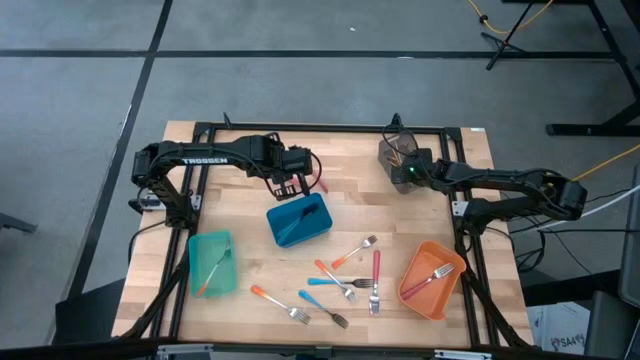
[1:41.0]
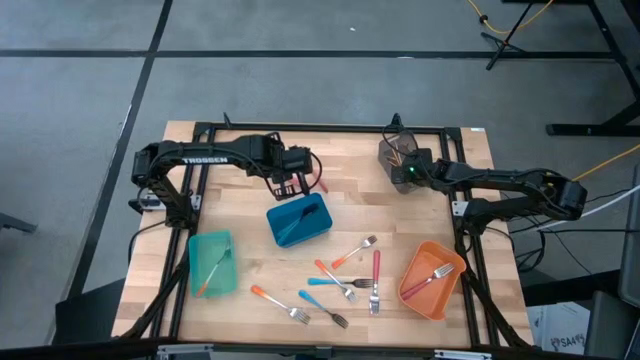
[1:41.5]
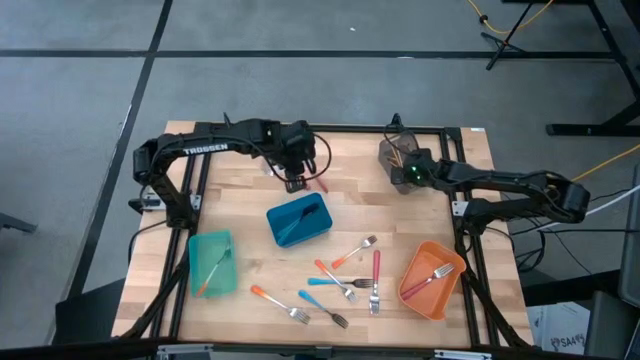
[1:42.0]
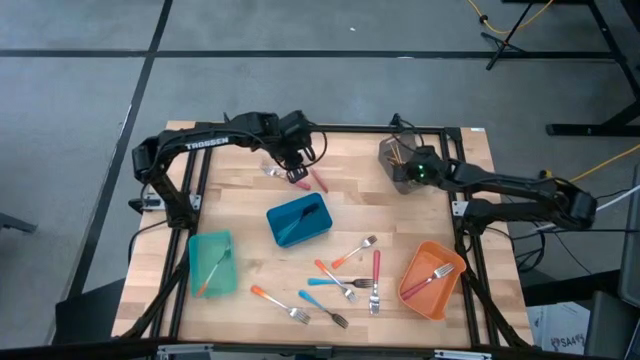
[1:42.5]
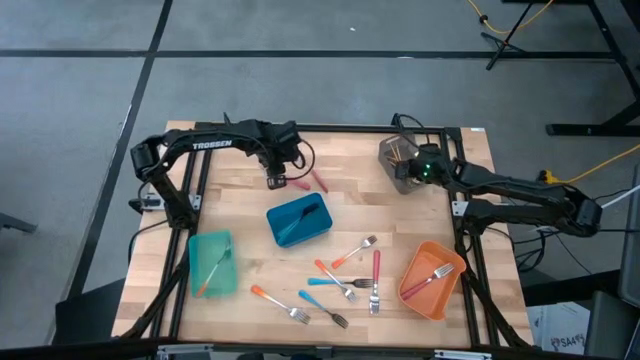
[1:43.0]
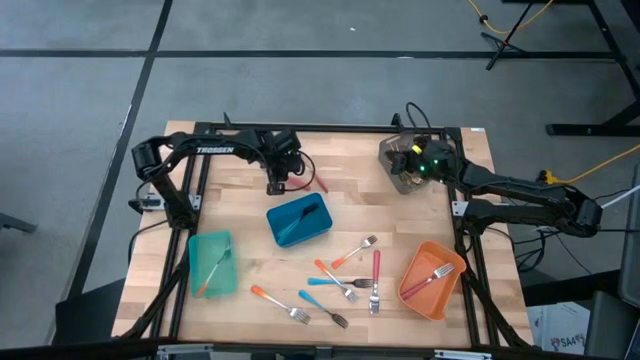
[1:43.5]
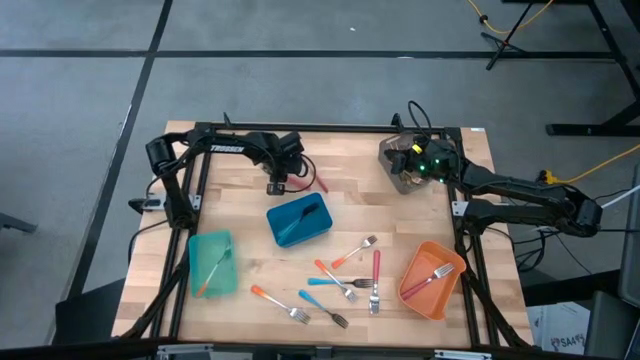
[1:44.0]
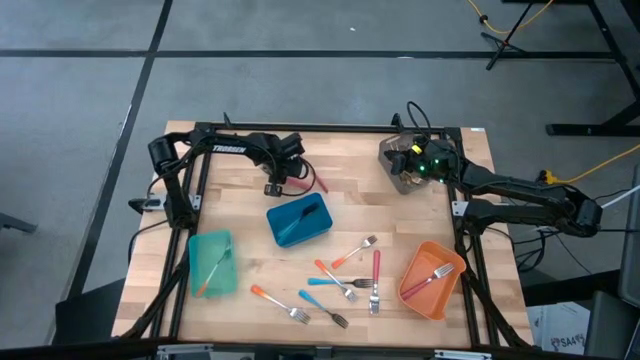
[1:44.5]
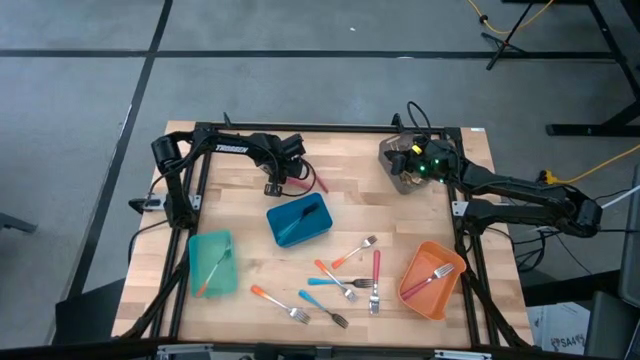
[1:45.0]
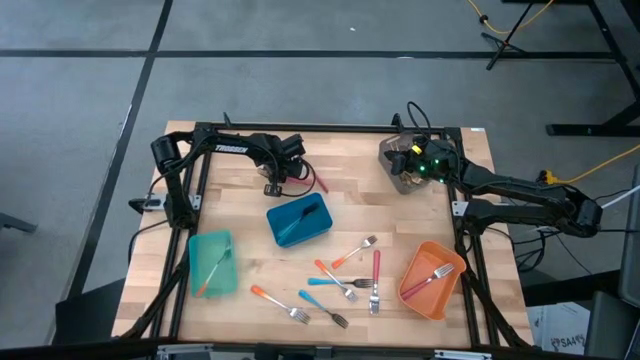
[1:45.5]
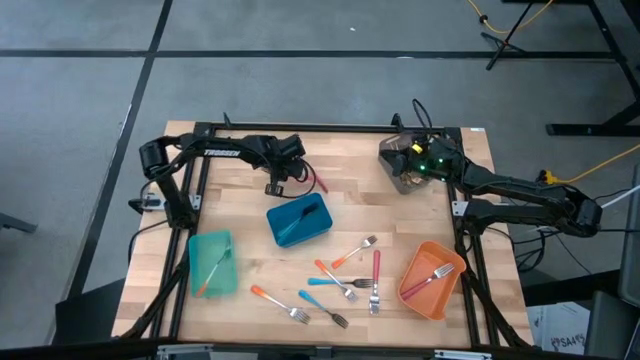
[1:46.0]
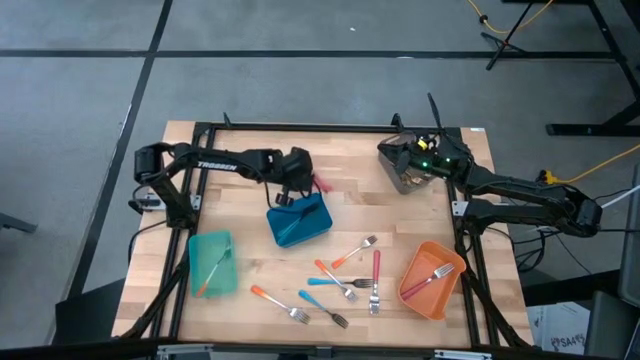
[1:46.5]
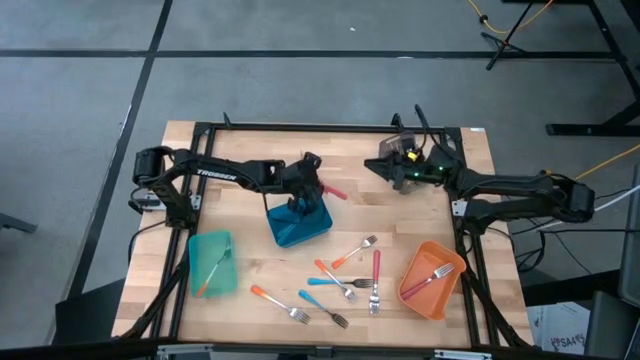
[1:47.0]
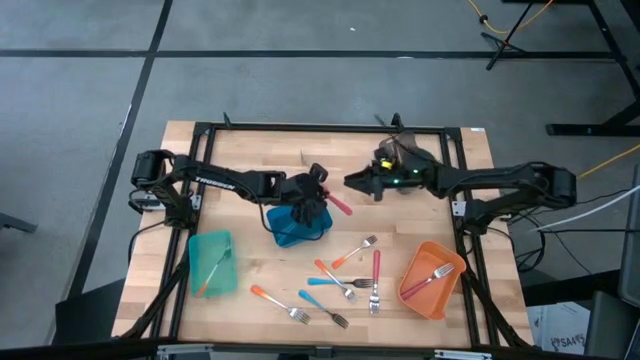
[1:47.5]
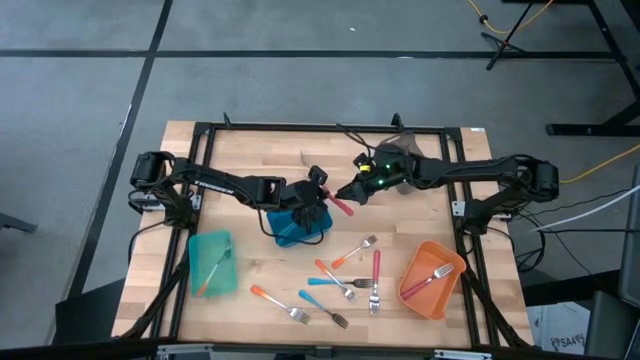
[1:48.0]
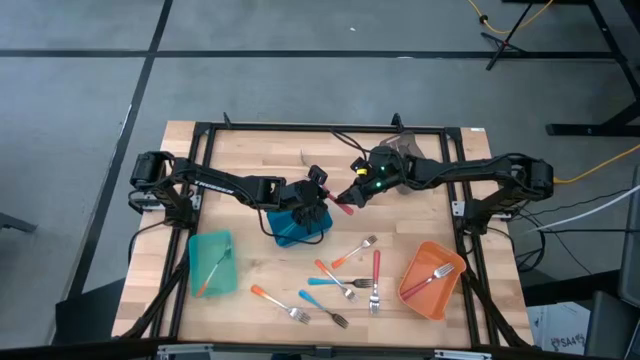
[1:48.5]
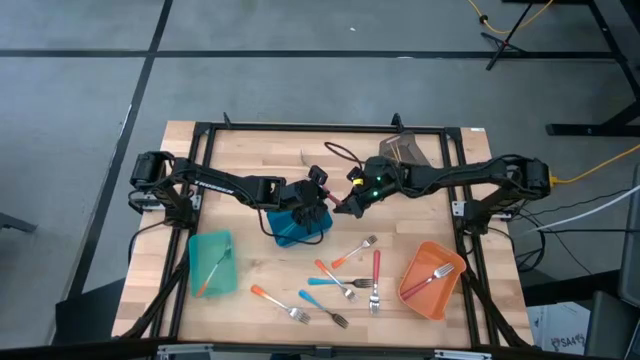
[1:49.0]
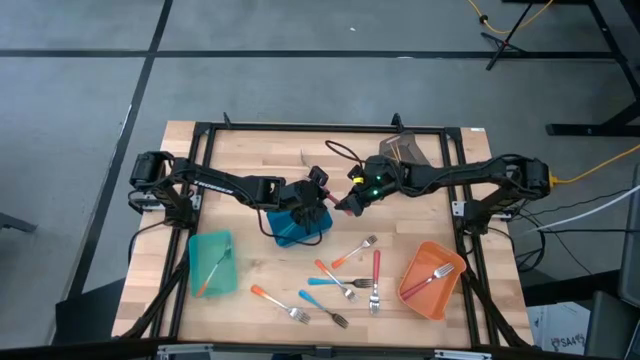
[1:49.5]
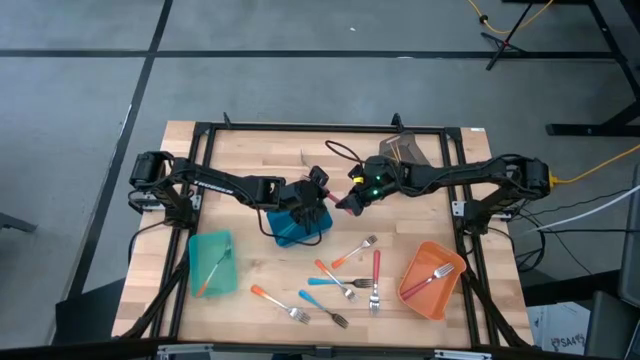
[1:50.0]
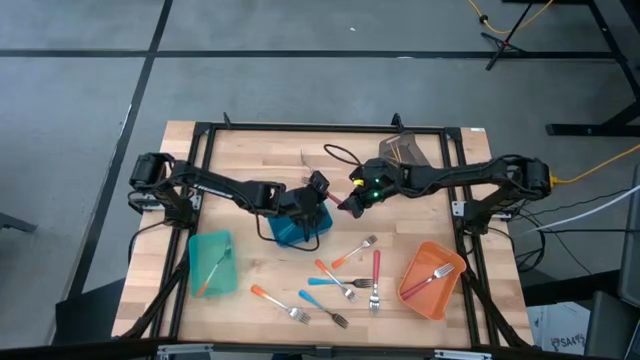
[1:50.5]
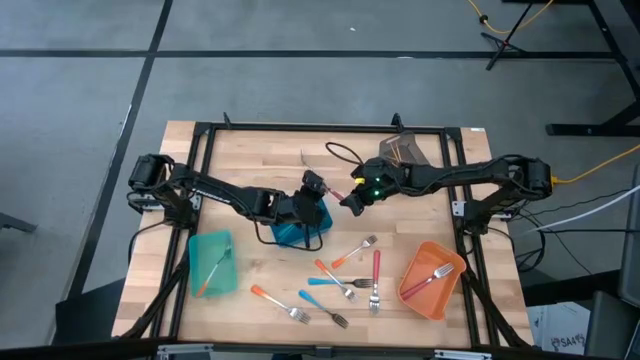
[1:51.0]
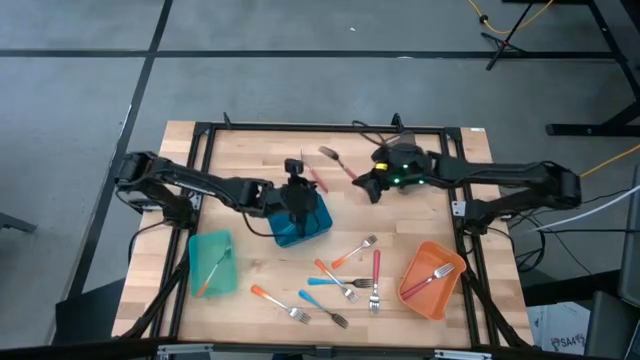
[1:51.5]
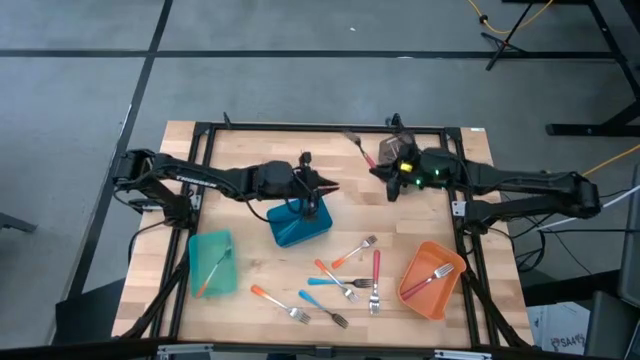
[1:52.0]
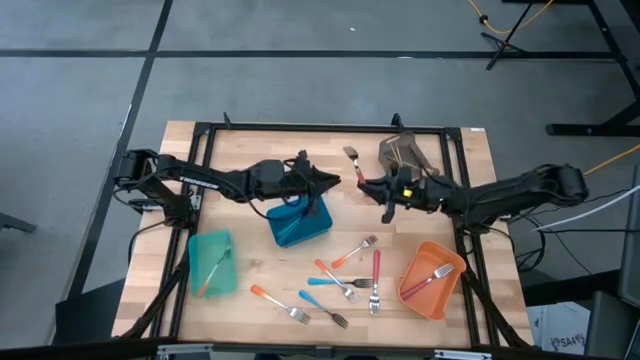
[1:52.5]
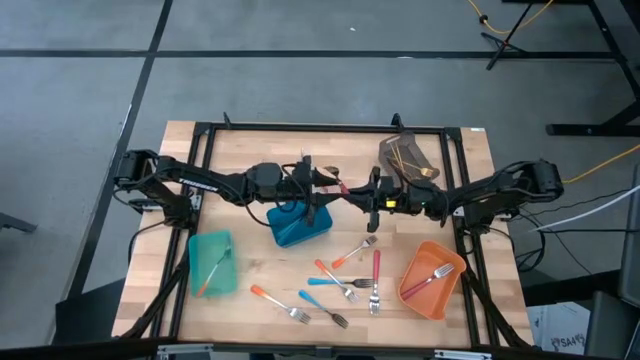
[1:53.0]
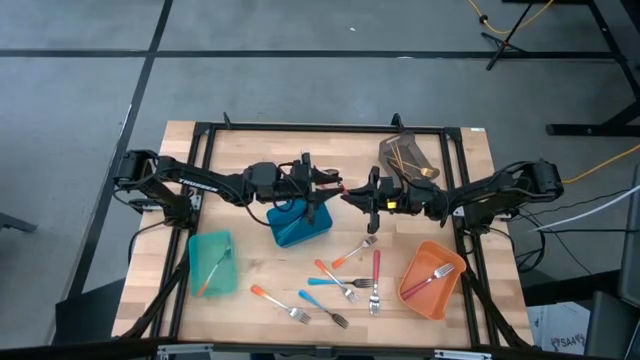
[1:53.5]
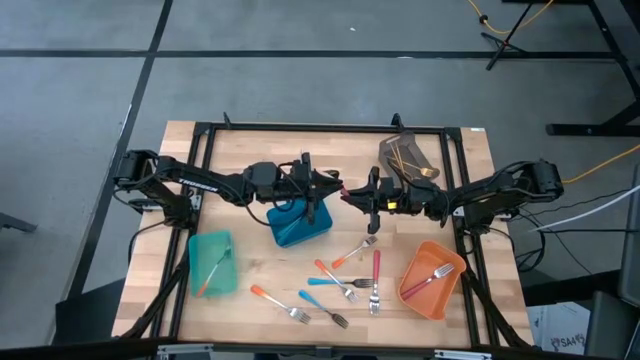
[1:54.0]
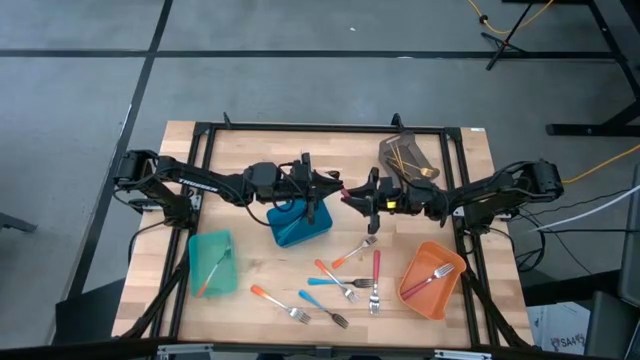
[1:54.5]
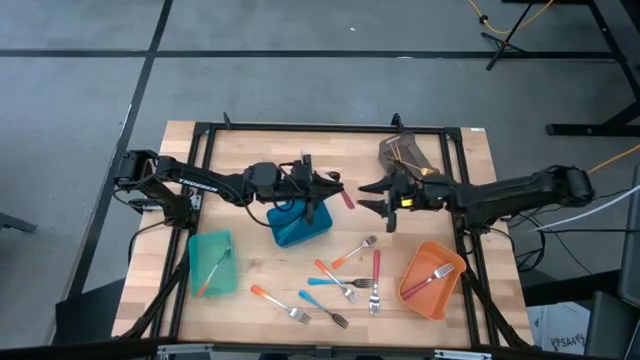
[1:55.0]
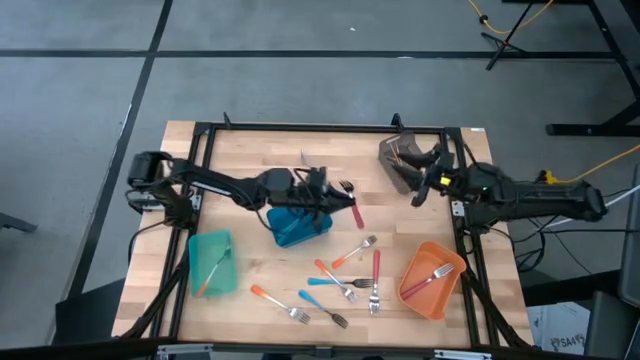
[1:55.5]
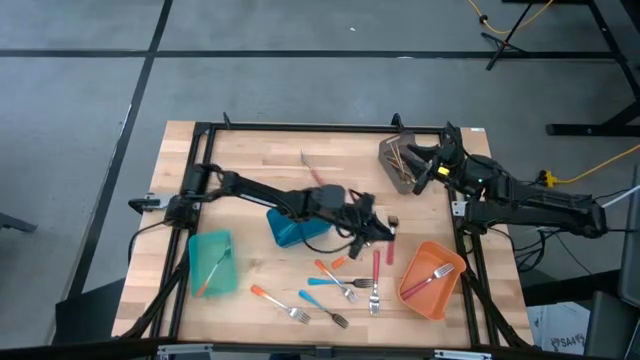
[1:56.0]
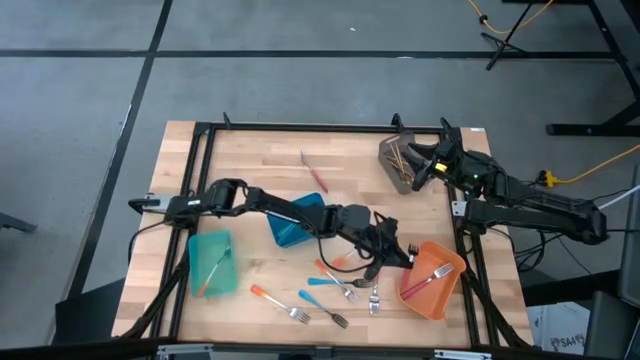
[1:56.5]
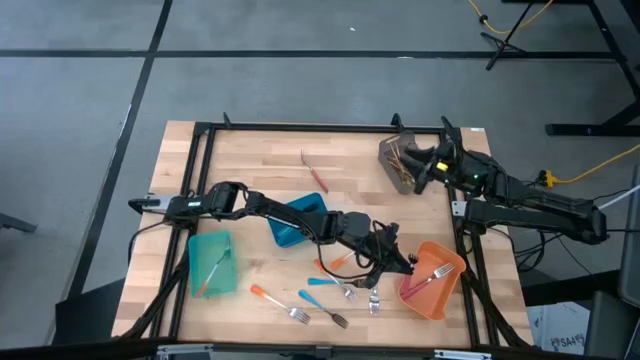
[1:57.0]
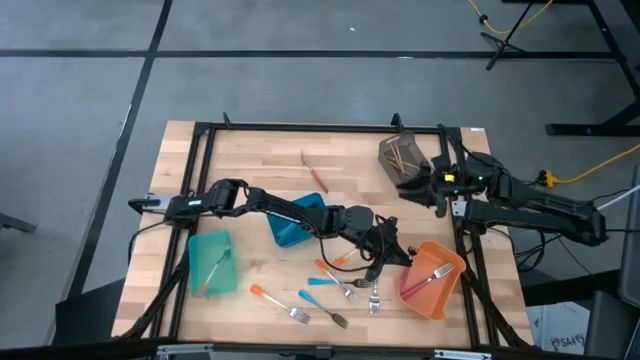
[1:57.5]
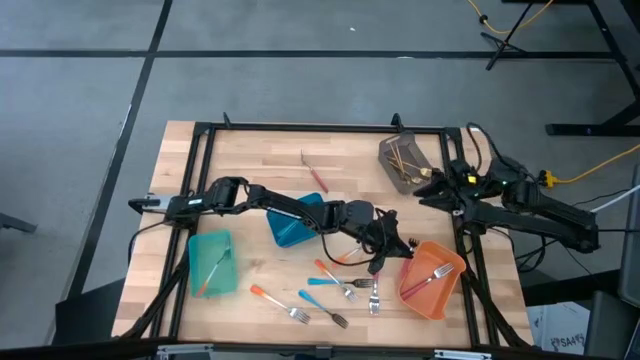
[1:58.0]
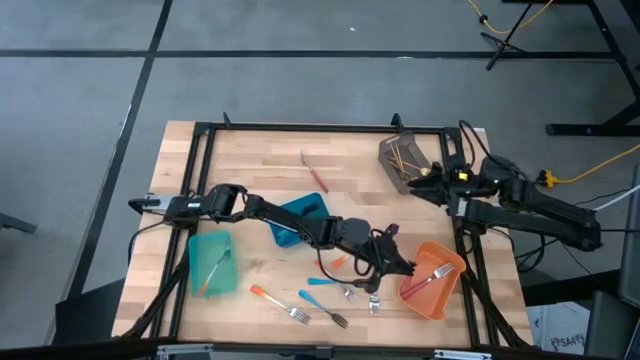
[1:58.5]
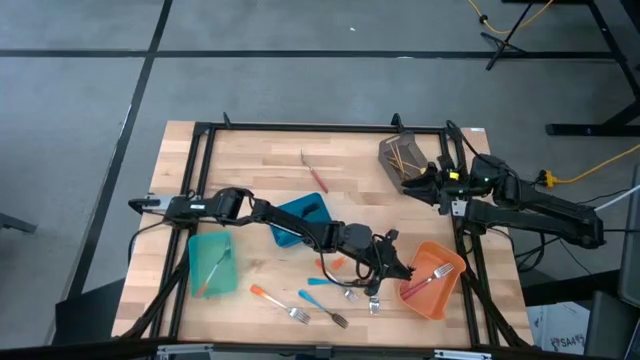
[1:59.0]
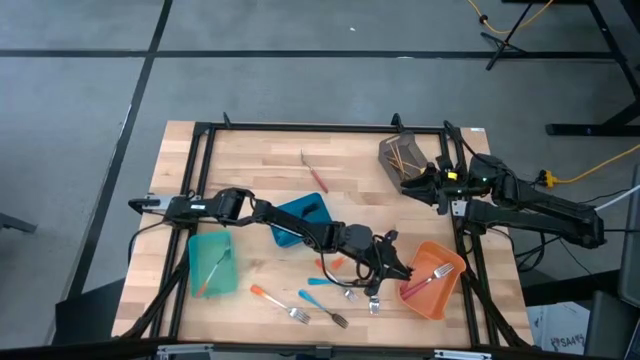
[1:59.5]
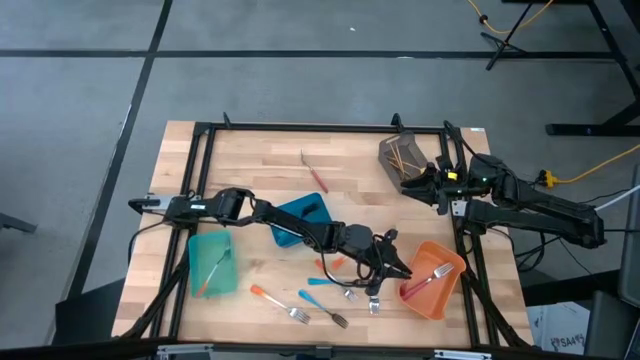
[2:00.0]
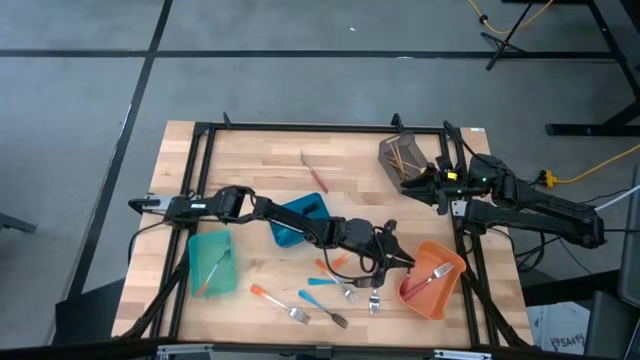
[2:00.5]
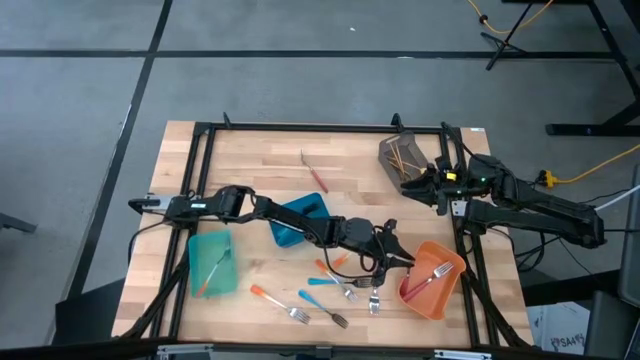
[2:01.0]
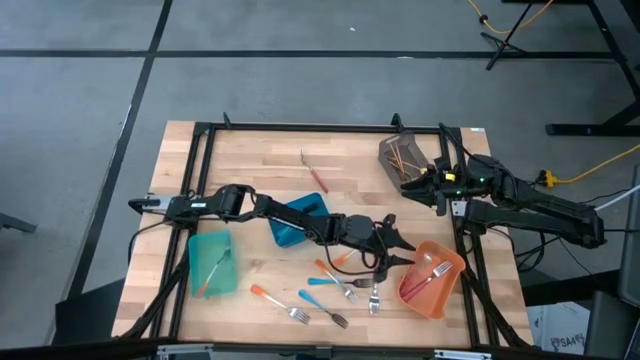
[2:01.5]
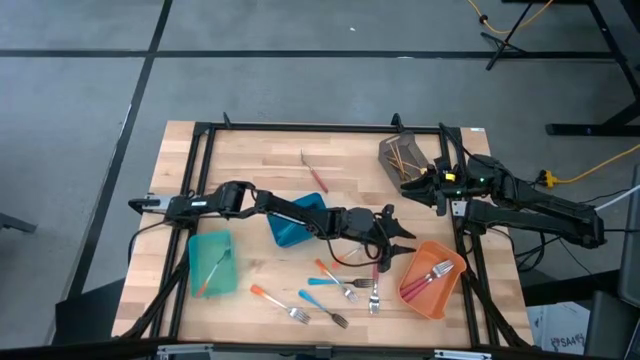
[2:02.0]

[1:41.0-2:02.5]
Task: Sort silverware by color (type)
Put the top left pink fork into the orange bin
